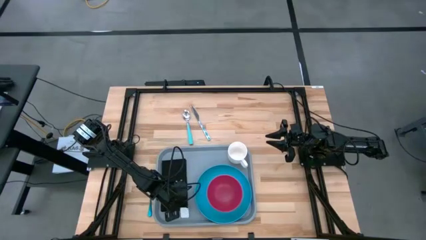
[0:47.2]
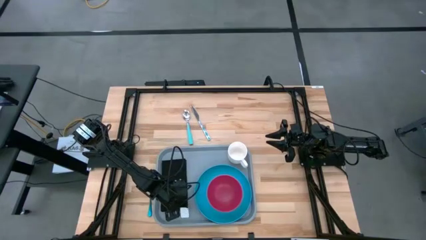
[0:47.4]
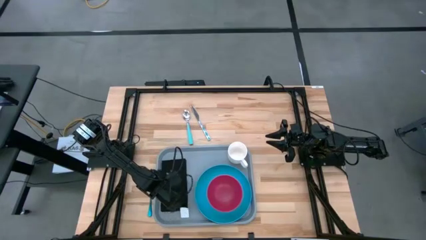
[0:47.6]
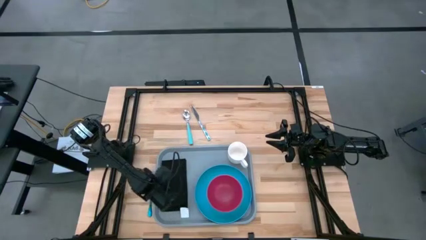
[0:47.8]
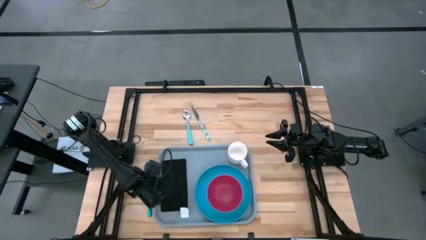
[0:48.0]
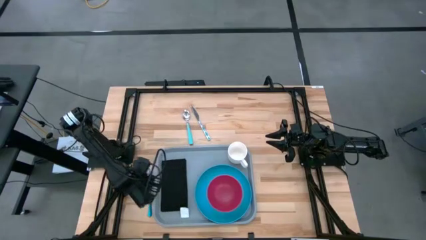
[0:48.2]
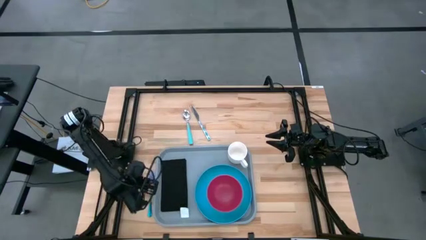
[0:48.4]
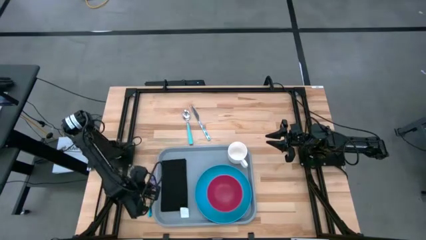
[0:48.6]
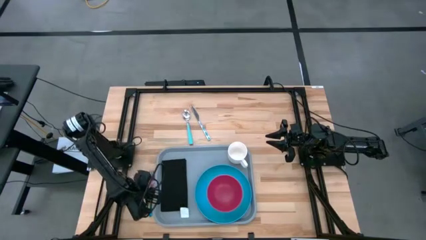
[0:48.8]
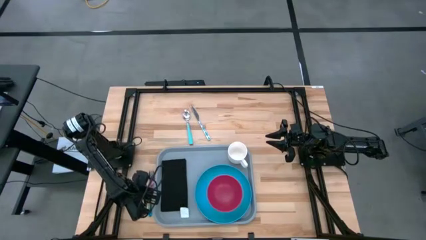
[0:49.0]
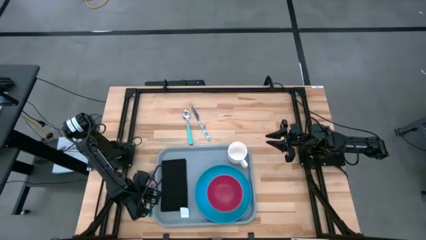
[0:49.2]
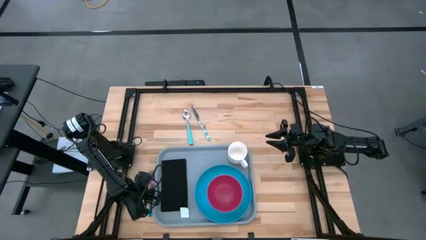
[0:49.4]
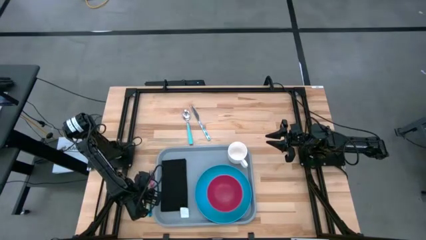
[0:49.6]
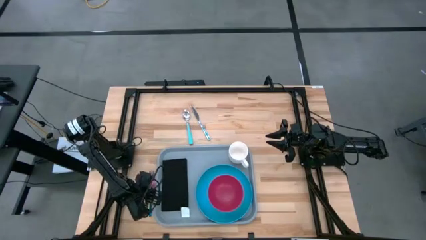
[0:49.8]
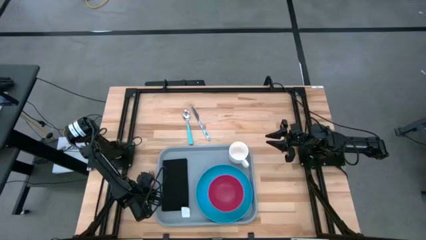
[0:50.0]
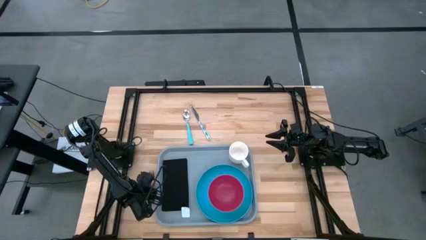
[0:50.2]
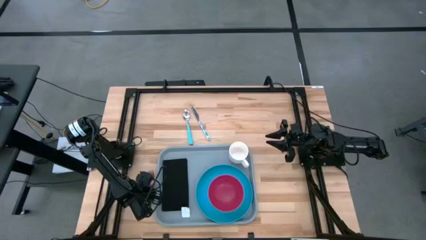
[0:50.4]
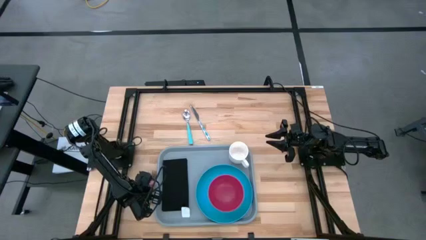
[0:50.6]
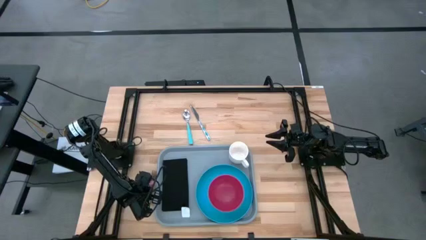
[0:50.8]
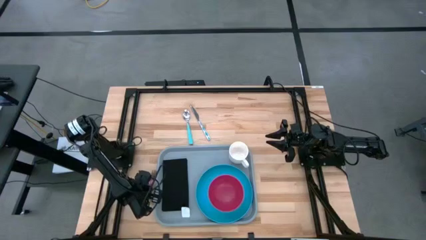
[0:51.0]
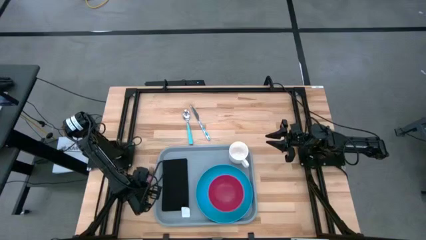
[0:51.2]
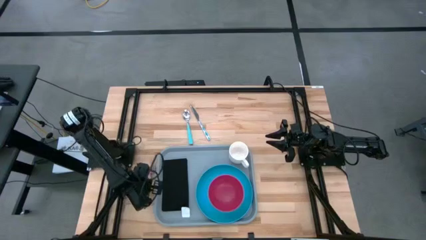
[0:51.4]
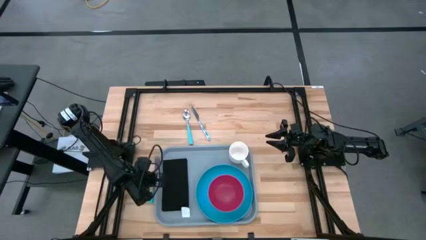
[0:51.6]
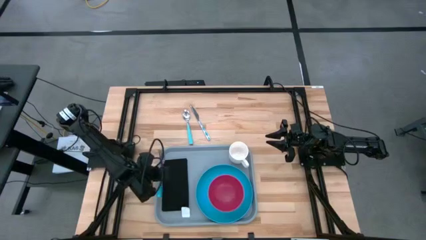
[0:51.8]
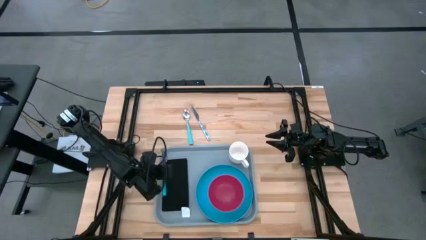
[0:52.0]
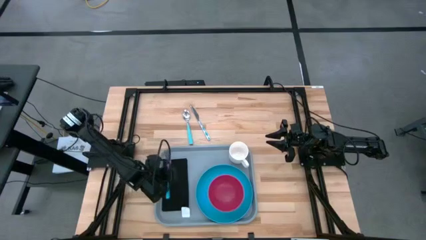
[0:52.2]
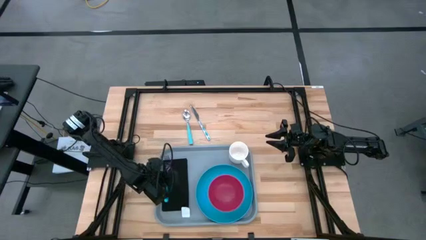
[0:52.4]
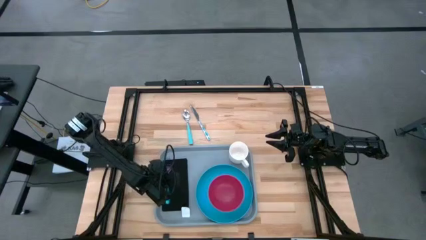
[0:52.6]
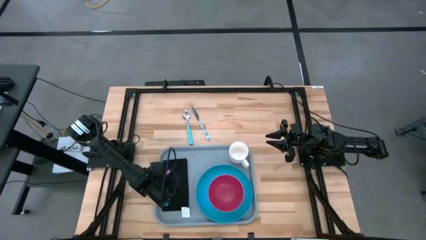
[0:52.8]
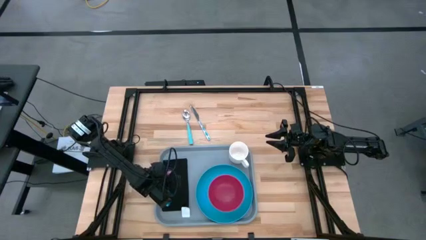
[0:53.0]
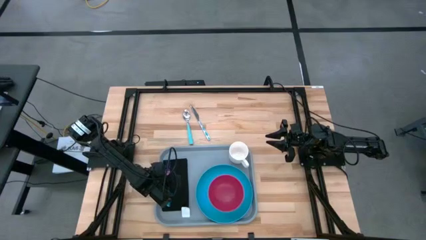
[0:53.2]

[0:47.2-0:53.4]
Task: Set up tray
Put the blue fork on top of the black napkin on the gray tray

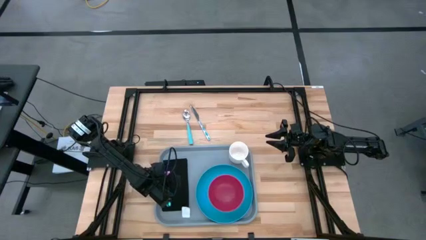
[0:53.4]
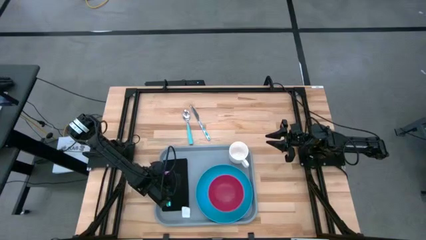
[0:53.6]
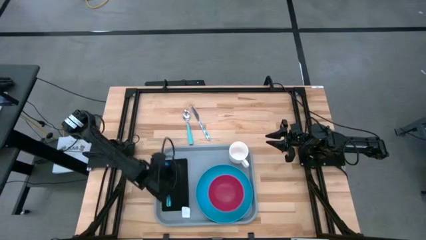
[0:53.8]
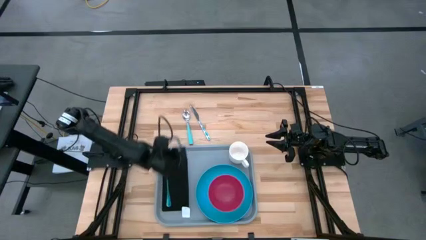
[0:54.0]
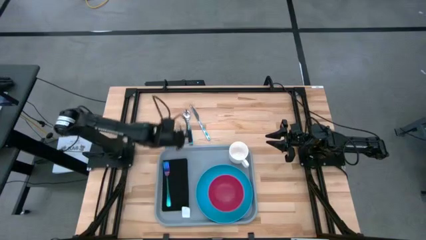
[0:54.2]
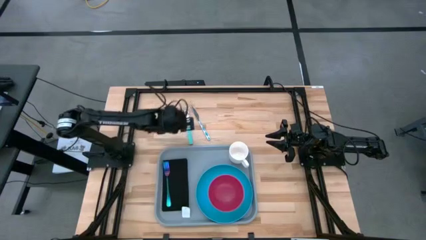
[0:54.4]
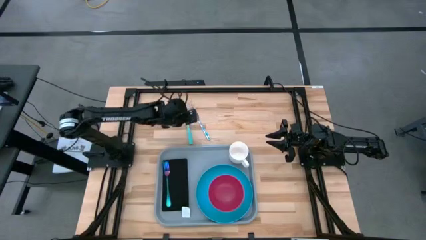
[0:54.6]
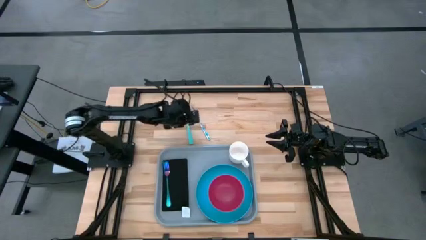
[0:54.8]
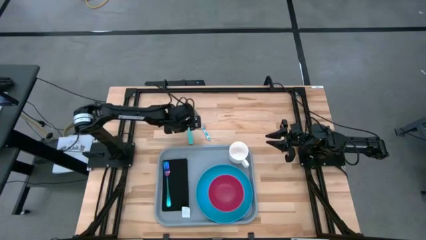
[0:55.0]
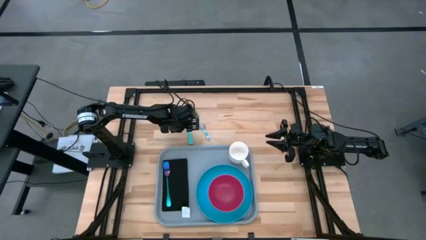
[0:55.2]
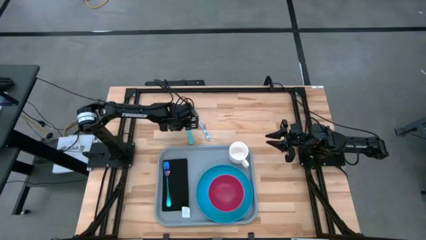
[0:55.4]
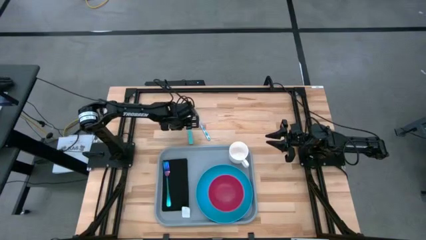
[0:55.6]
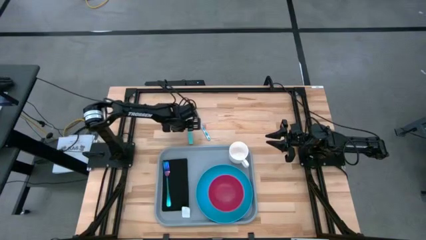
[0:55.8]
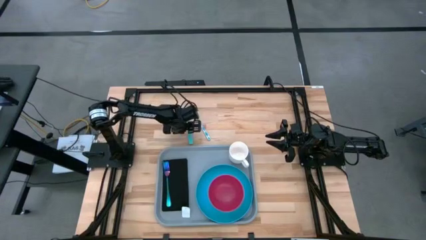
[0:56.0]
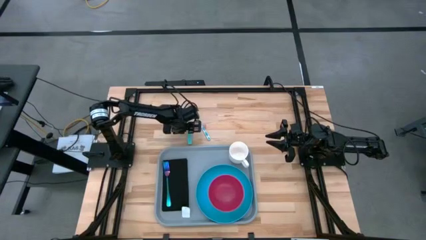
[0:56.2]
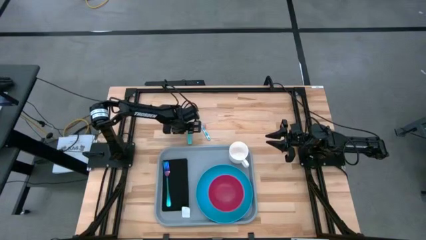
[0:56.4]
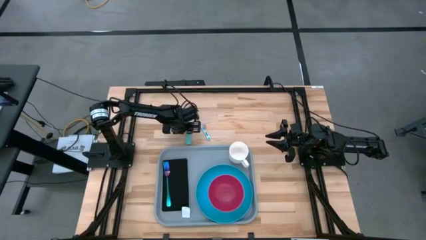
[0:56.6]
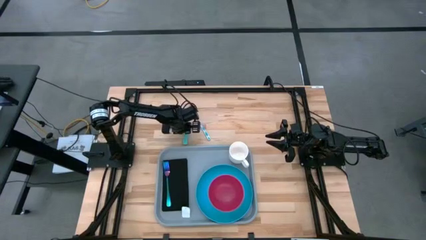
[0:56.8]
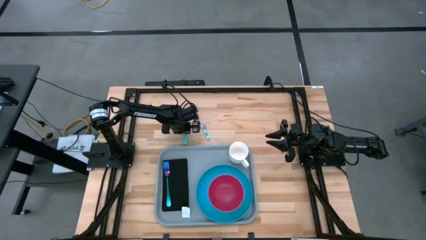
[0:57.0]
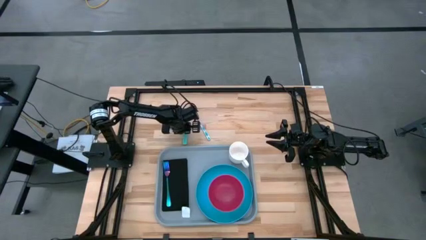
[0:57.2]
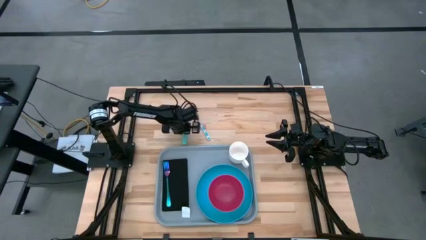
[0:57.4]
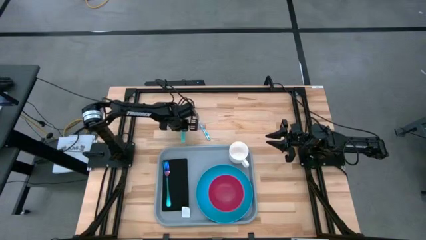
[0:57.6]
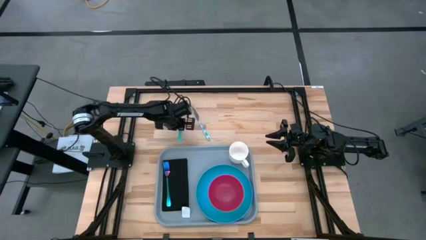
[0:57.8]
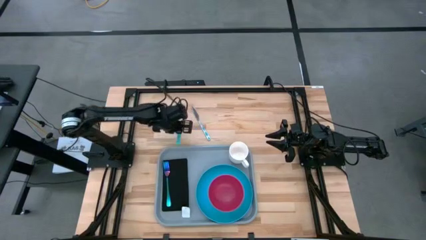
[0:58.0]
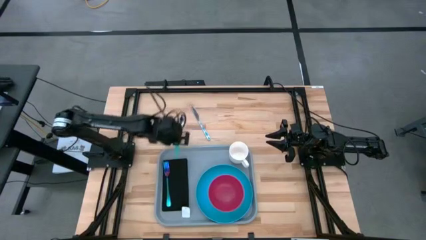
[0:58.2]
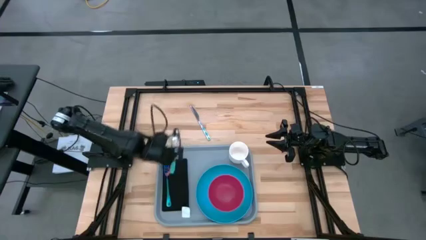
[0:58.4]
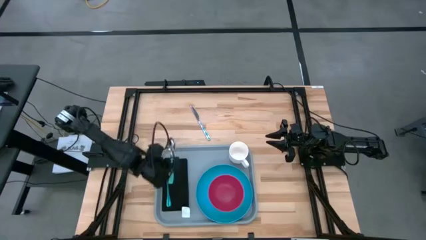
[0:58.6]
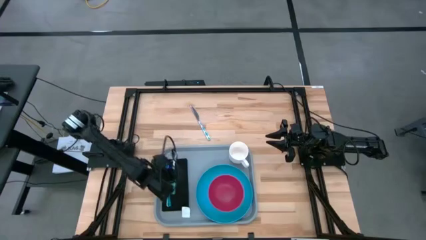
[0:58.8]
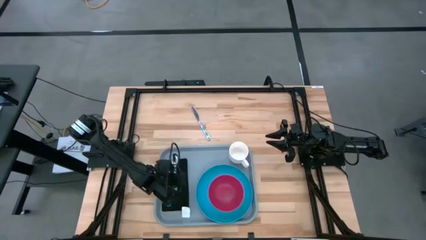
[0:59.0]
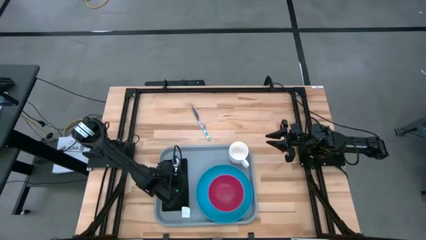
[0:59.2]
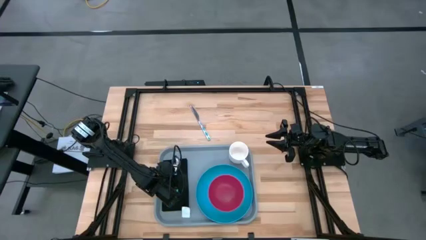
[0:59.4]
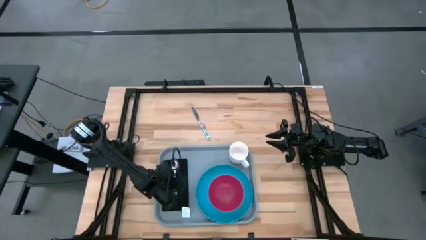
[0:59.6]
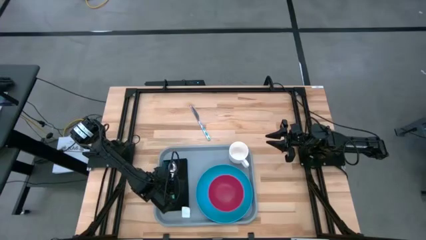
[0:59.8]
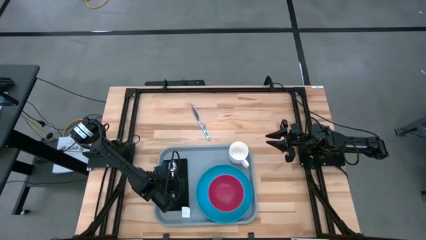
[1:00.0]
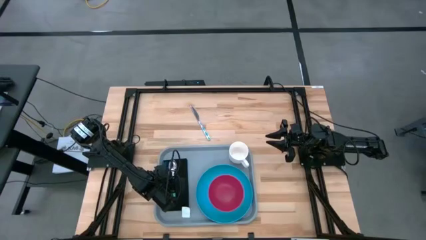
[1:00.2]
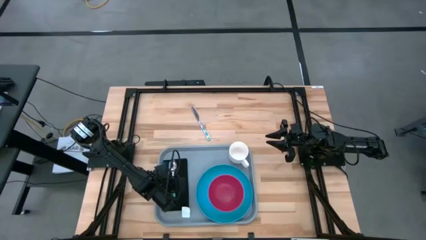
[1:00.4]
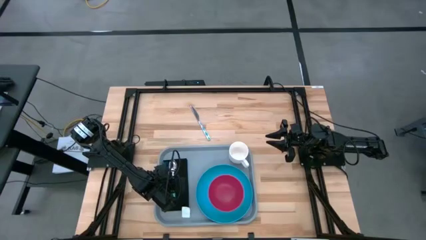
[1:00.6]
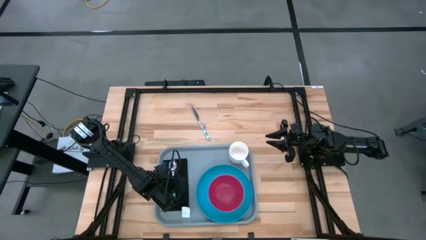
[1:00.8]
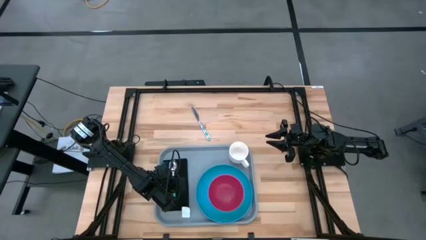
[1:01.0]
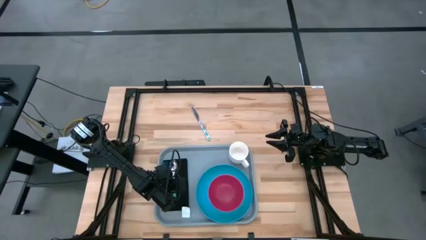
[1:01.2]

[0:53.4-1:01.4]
Put the green spoon on top of the black napkin on the gray tray to the right of the blue fork
